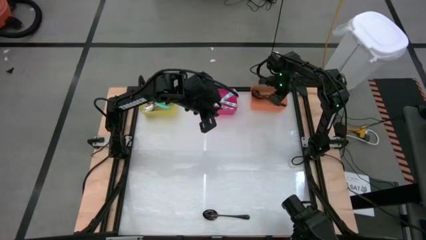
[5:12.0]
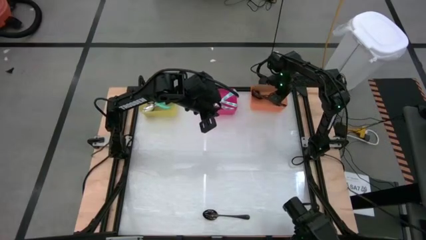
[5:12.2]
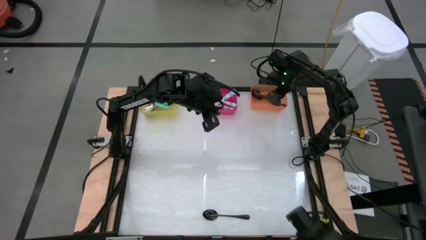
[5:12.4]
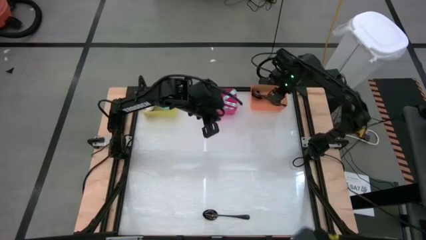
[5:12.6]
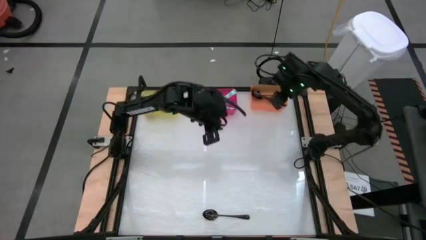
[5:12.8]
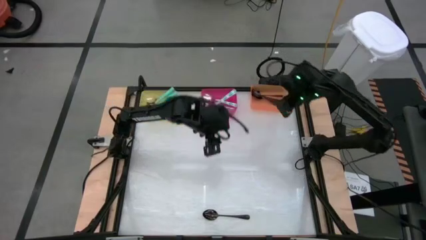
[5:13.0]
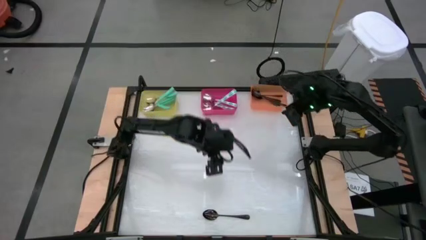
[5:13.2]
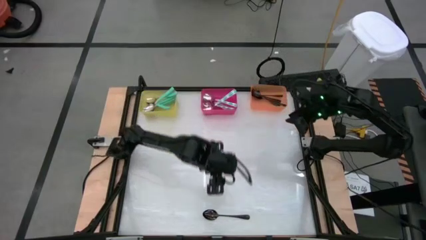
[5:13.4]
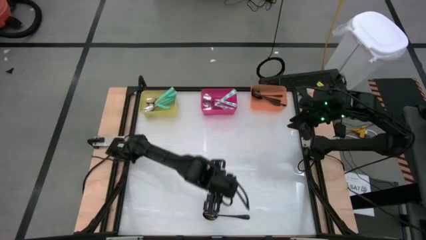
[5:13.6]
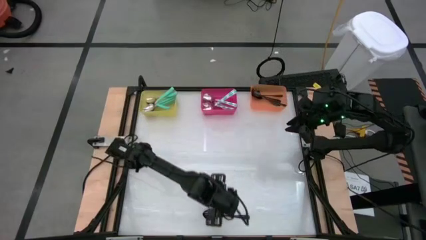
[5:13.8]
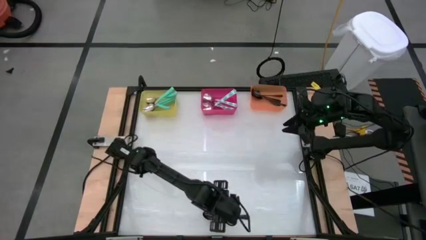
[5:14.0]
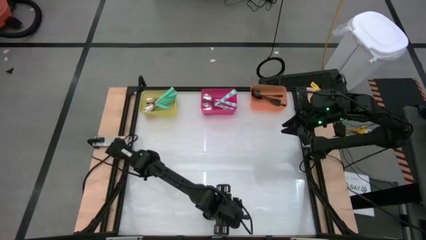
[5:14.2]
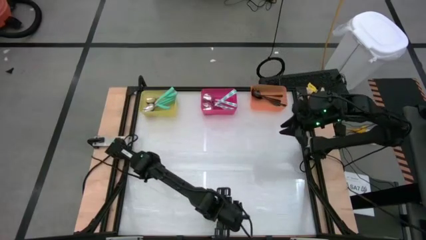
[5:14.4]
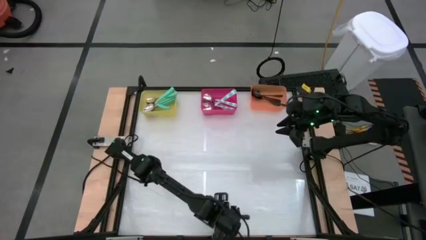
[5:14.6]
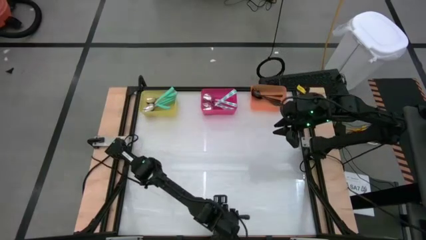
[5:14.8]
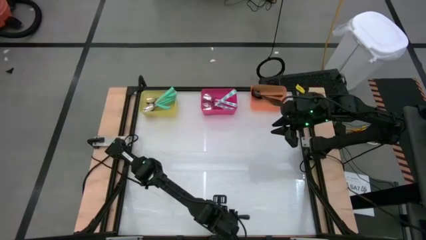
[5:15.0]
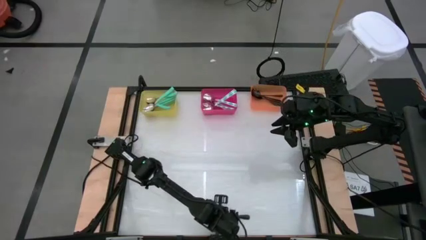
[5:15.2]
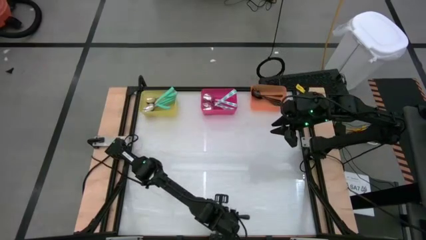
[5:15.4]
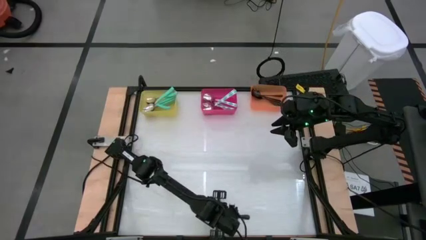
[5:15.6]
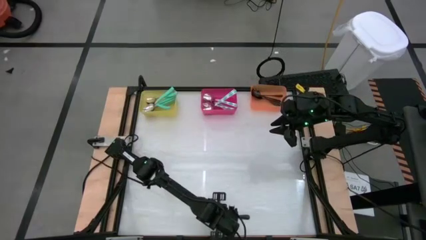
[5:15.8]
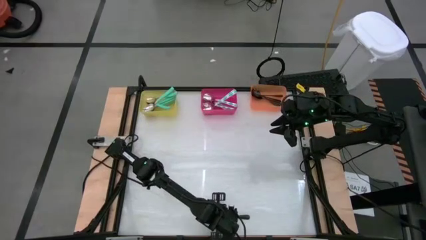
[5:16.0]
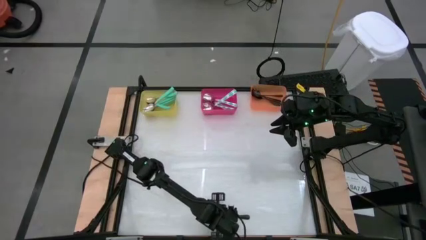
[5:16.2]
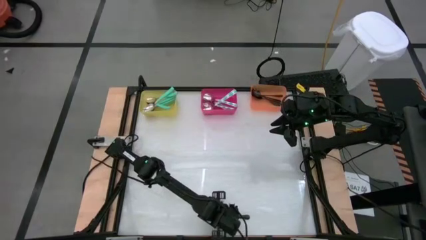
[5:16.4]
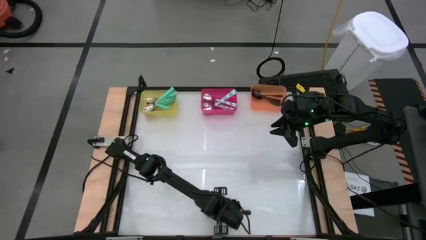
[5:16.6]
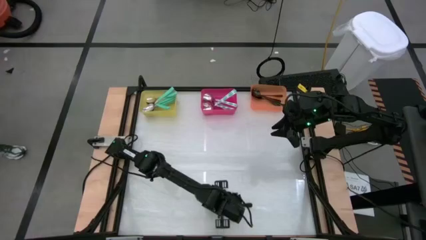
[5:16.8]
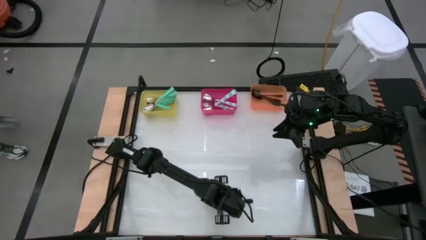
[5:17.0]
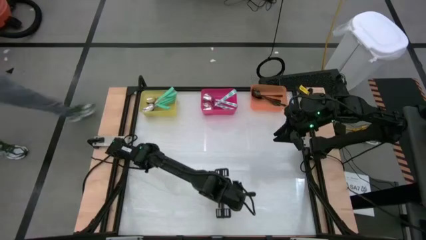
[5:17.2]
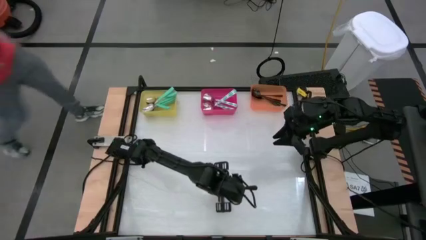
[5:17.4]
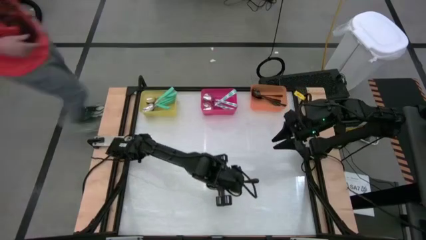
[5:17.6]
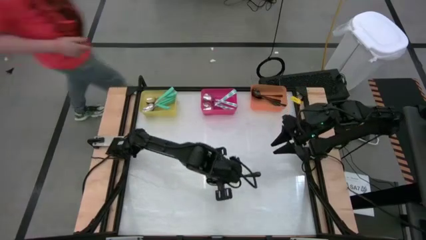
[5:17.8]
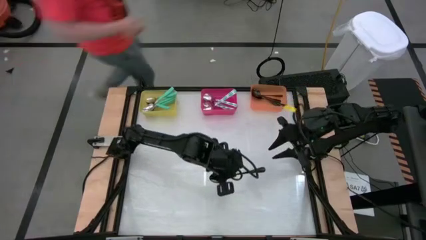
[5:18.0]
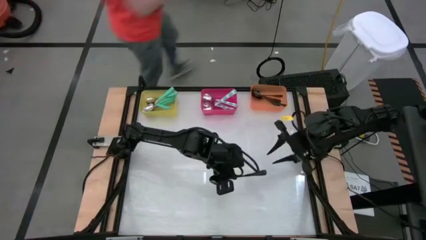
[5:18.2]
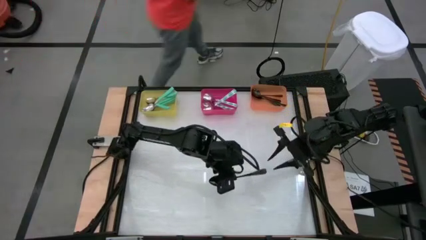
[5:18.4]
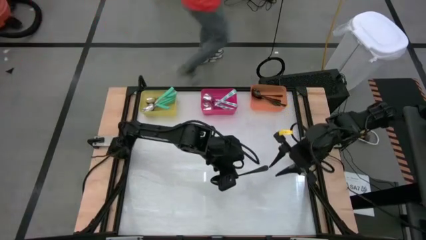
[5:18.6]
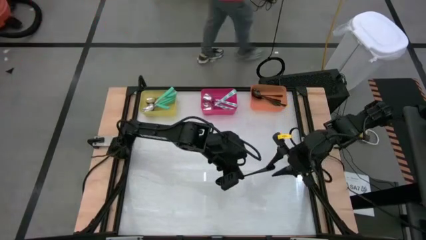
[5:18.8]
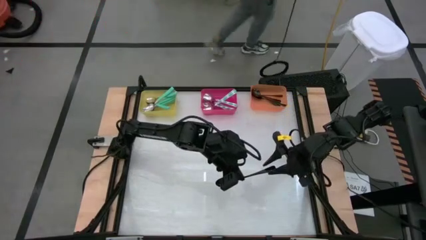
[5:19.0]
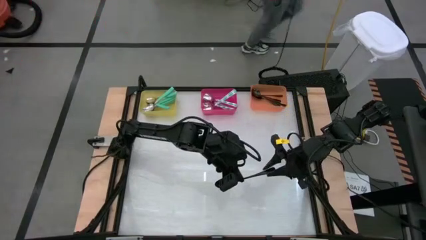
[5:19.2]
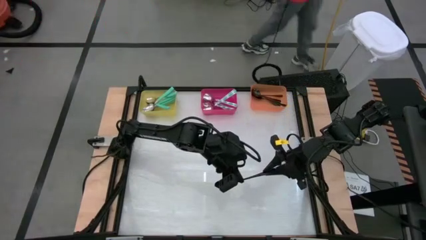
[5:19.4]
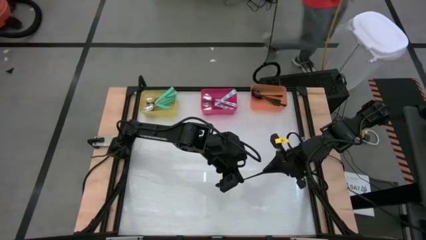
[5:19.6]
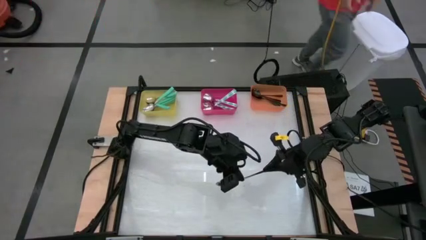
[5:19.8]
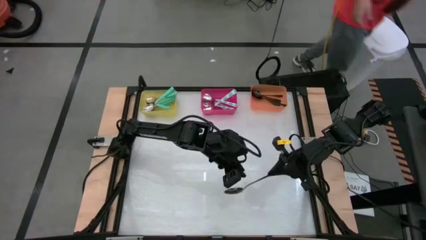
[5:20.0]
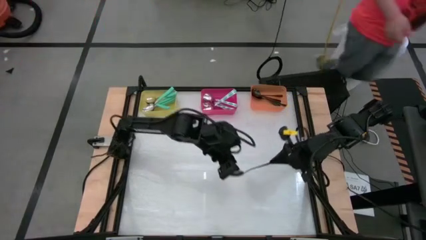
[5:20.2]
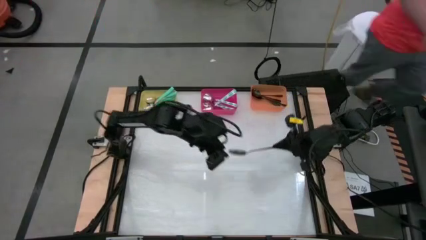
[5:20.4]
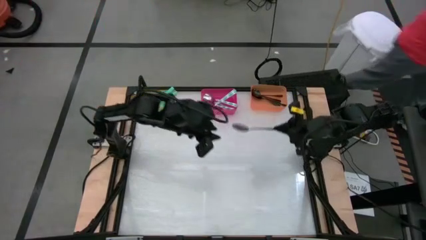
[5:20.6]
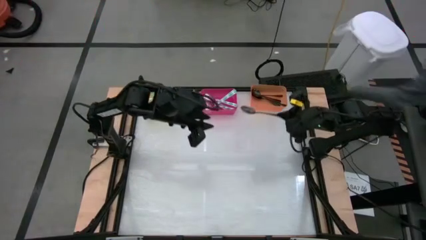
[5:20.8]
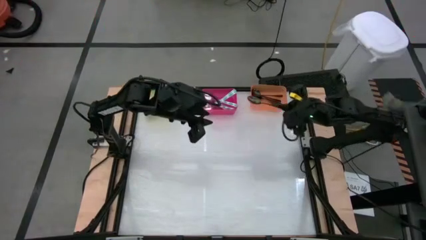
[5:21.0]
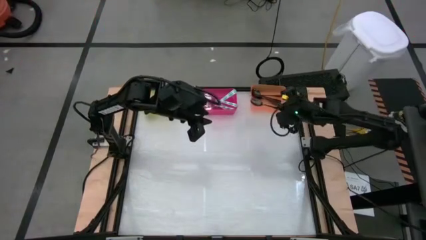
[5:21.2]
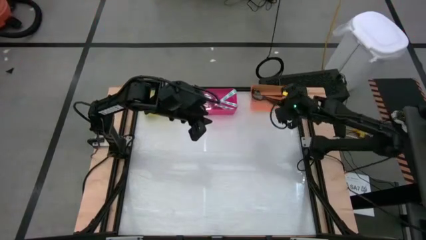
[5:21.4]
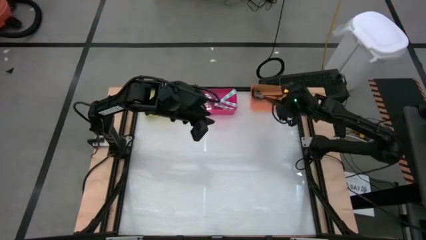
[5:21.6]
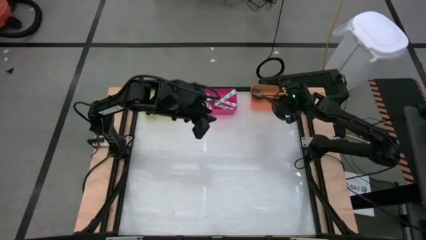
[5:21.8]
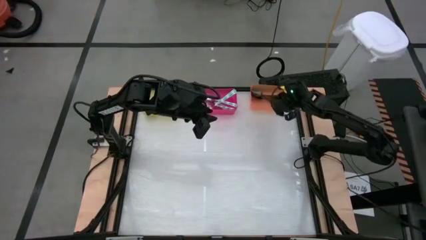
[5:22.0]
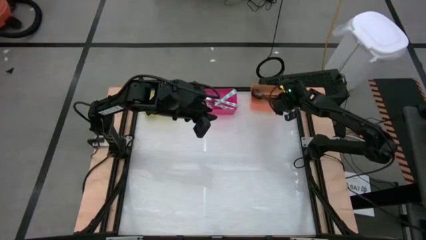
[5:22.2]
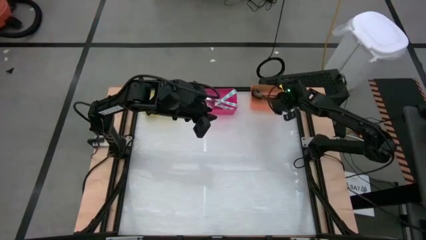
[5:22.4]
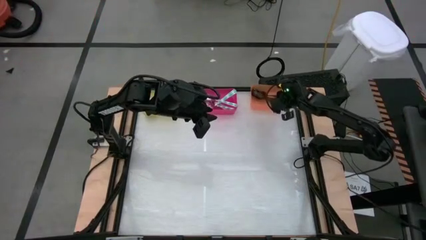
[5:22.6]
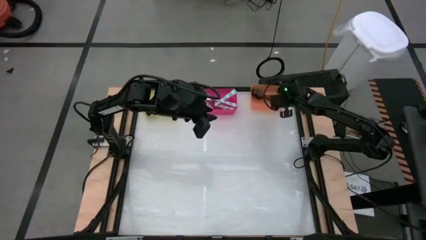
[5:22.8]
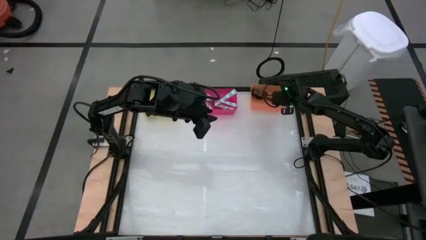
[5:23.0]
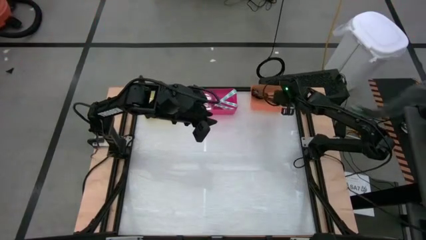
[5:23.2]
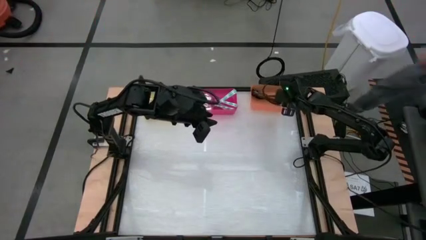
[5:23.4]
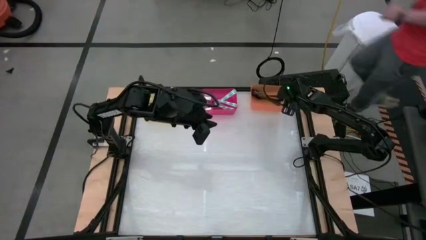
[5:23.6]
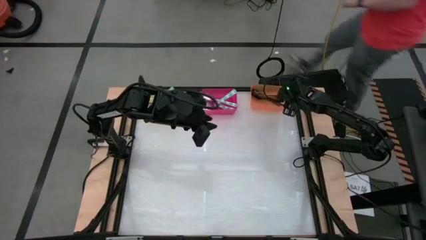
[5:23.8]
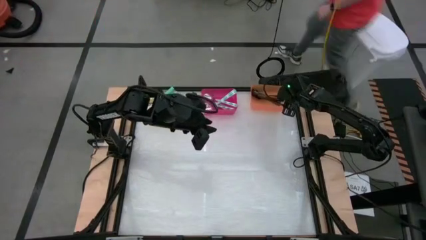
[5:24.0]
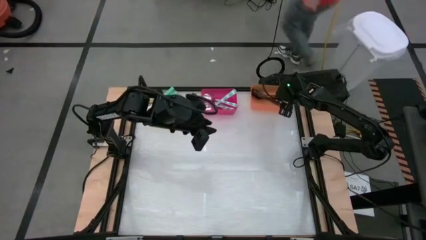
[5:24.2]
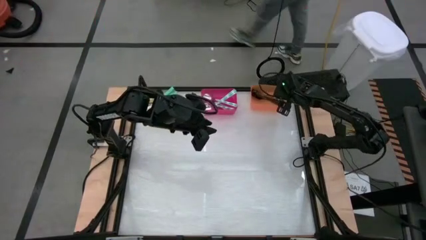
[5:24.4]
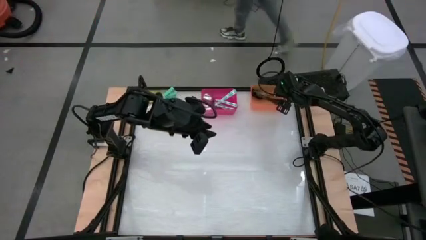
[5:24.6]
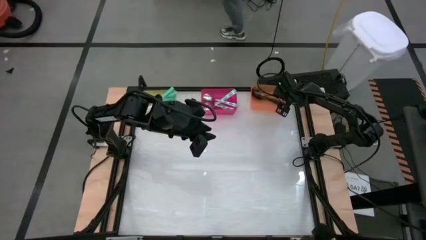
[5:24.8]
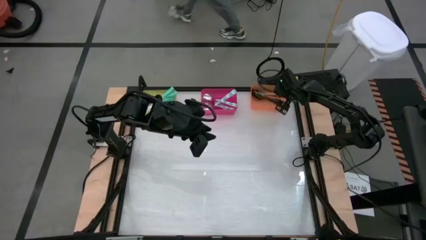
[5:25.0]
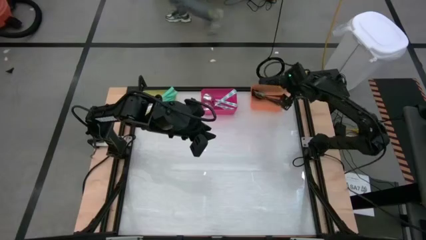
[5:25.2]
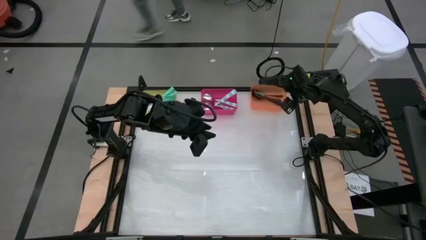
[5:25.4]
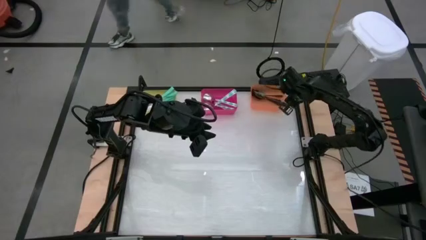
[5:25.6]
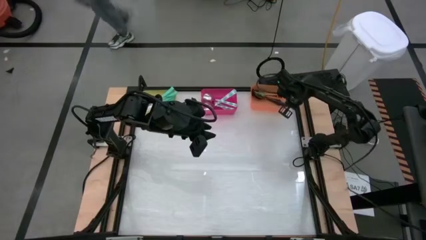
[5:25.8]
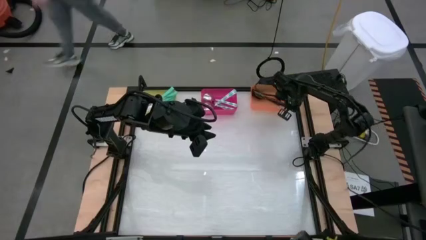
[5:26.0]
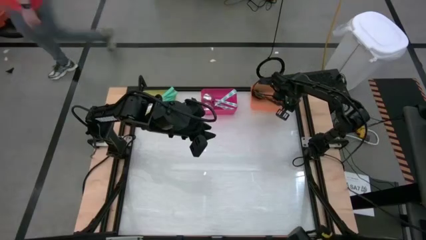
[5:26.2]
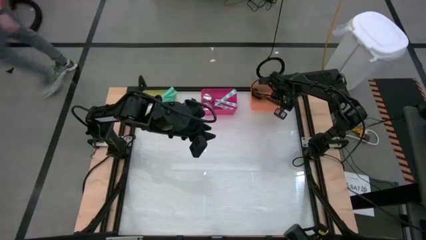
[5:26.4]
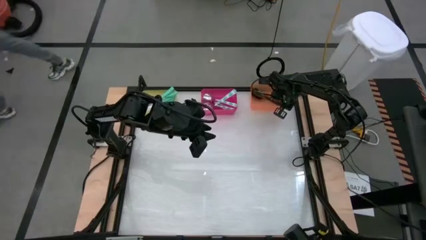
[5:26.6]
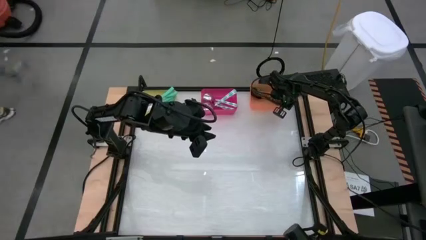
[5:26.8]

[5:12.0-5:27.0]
Task: Sort silverware by color (type)
Put the black spoon into the orange bin
